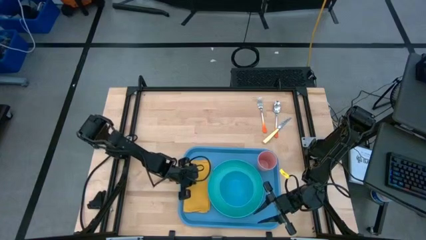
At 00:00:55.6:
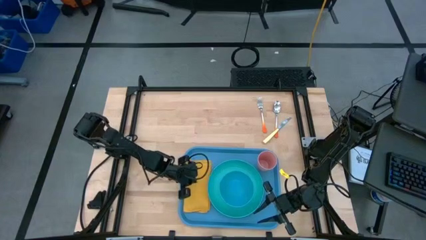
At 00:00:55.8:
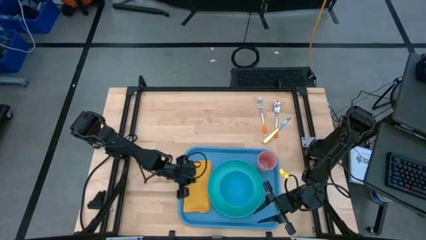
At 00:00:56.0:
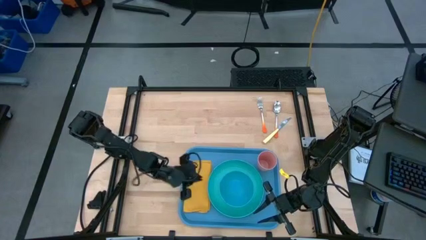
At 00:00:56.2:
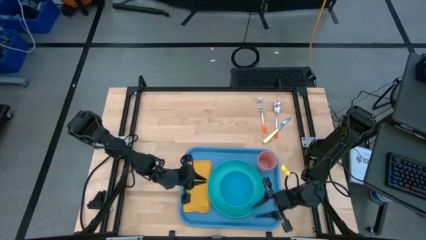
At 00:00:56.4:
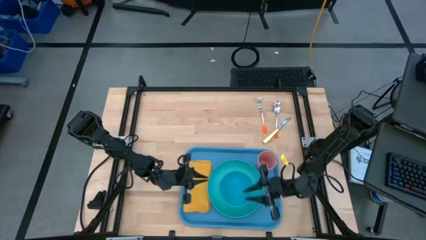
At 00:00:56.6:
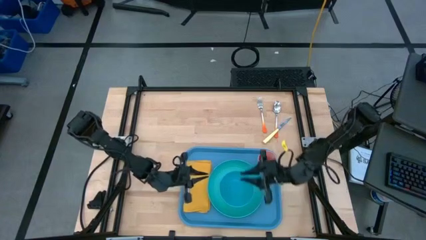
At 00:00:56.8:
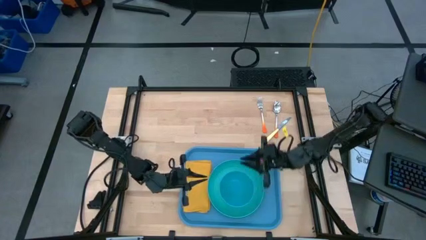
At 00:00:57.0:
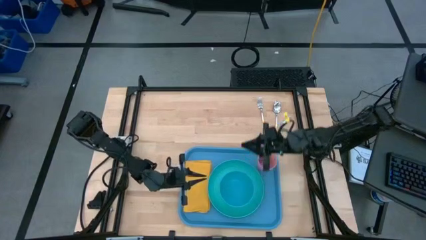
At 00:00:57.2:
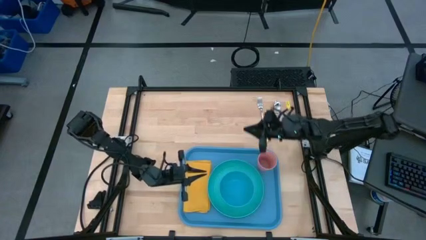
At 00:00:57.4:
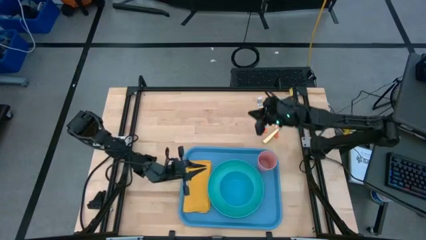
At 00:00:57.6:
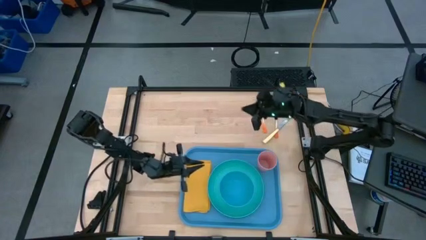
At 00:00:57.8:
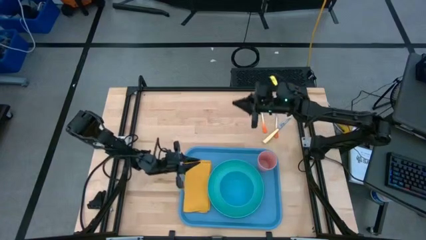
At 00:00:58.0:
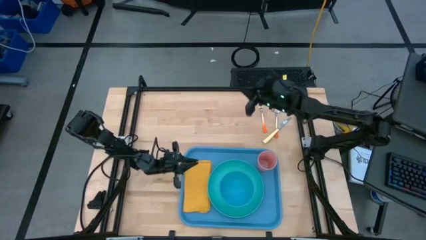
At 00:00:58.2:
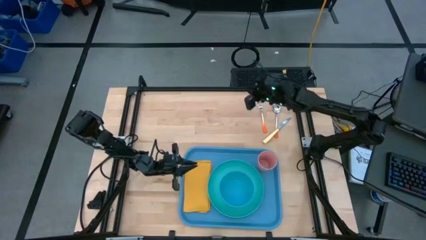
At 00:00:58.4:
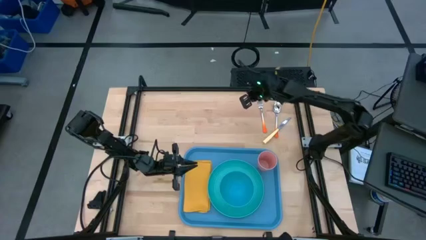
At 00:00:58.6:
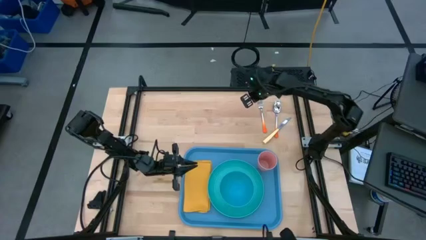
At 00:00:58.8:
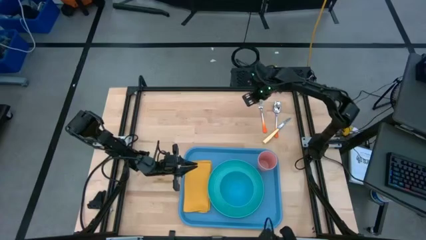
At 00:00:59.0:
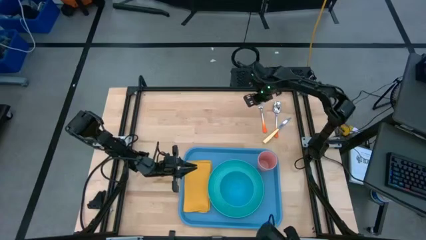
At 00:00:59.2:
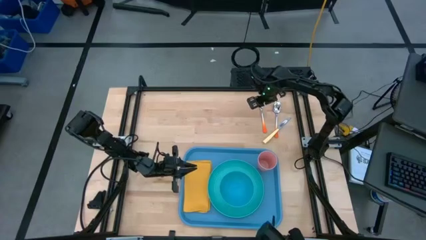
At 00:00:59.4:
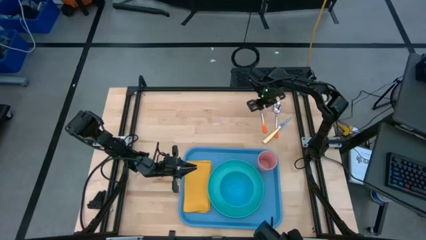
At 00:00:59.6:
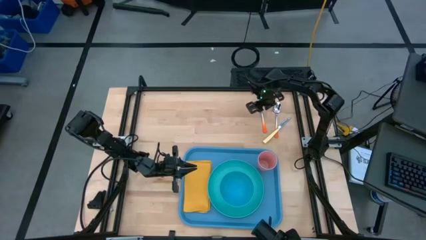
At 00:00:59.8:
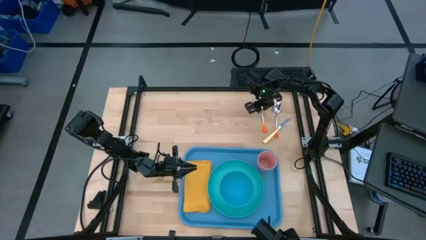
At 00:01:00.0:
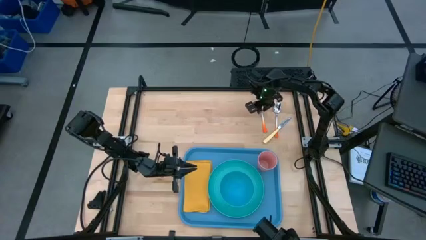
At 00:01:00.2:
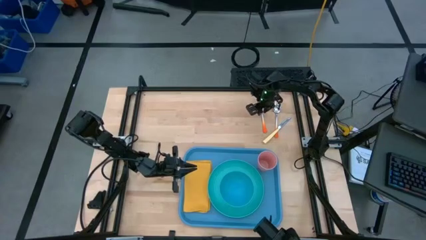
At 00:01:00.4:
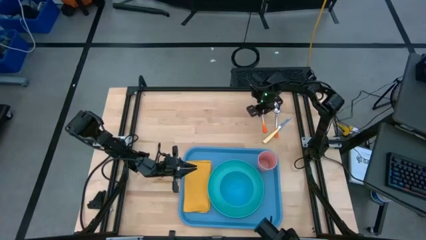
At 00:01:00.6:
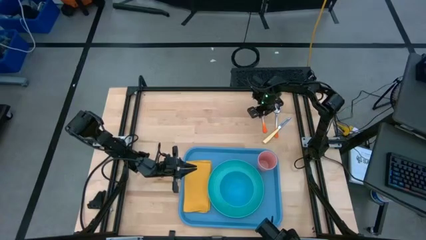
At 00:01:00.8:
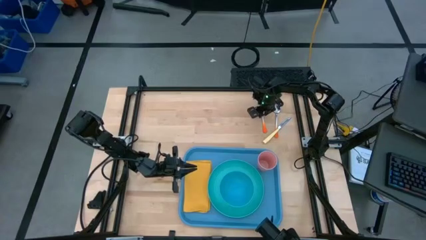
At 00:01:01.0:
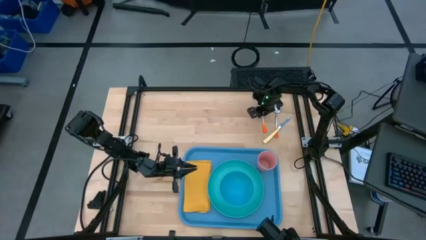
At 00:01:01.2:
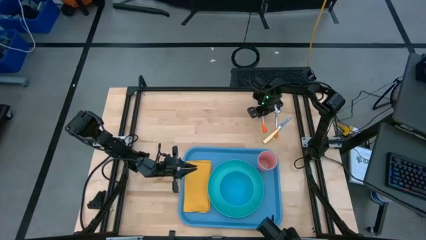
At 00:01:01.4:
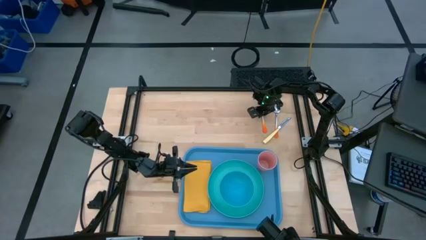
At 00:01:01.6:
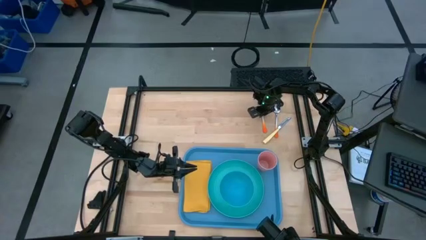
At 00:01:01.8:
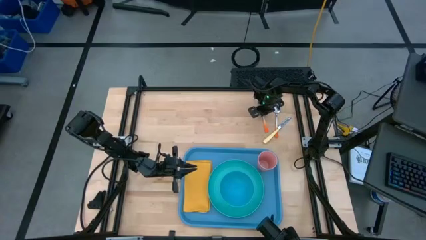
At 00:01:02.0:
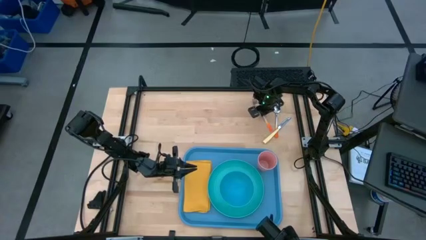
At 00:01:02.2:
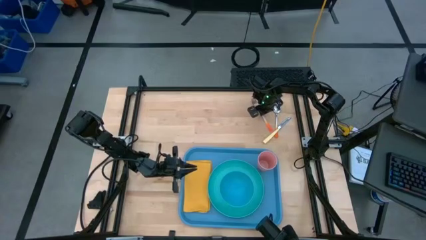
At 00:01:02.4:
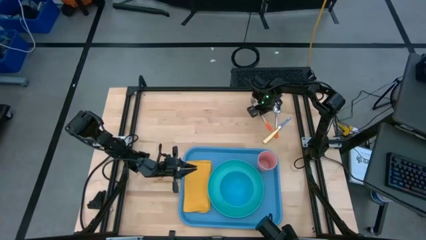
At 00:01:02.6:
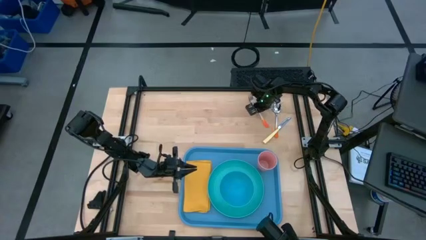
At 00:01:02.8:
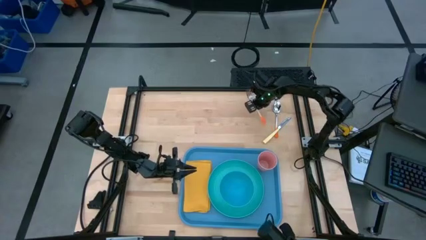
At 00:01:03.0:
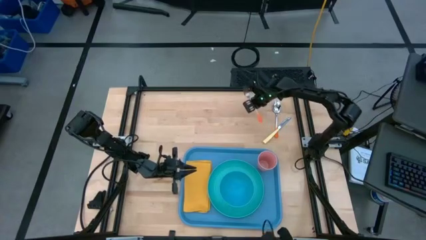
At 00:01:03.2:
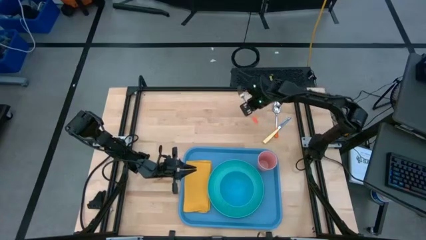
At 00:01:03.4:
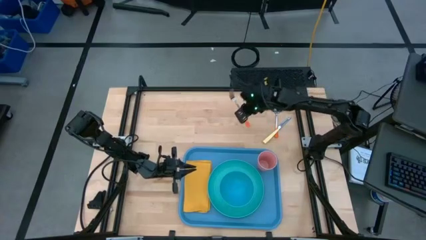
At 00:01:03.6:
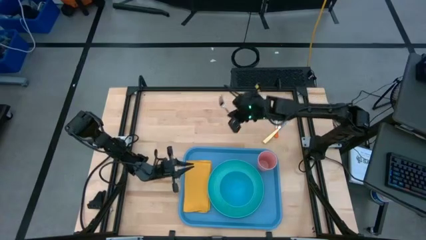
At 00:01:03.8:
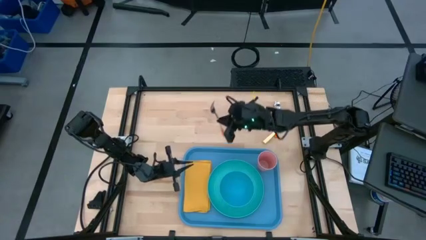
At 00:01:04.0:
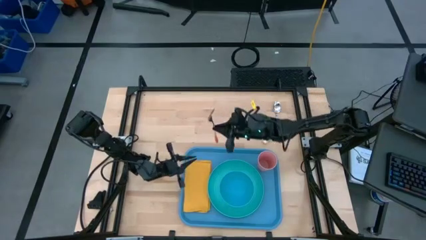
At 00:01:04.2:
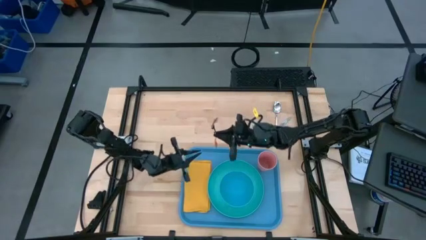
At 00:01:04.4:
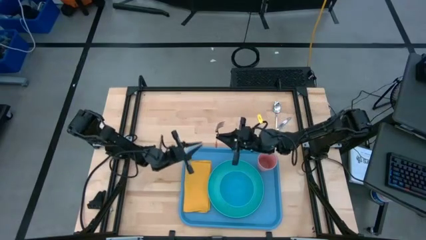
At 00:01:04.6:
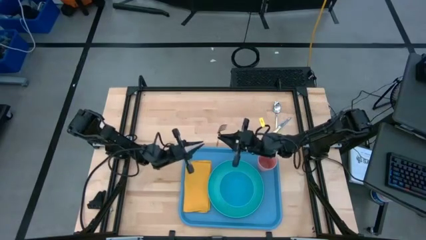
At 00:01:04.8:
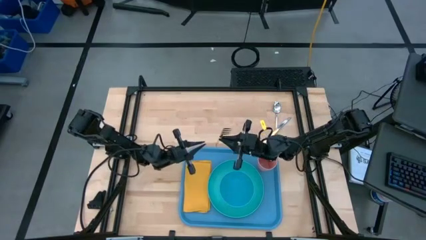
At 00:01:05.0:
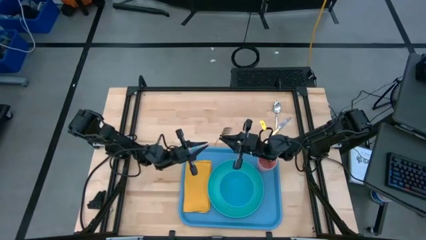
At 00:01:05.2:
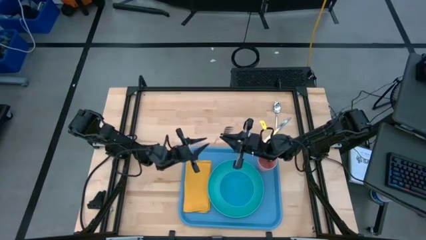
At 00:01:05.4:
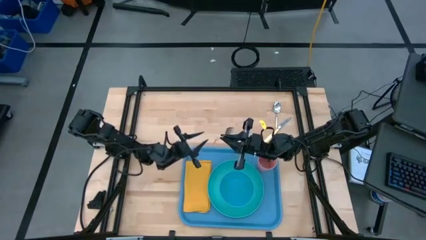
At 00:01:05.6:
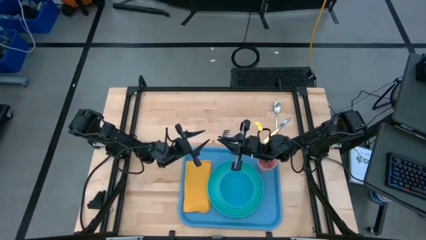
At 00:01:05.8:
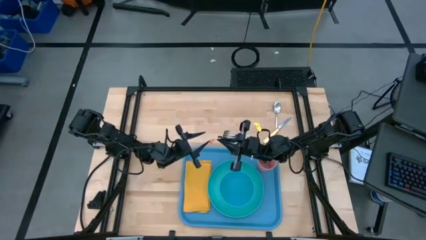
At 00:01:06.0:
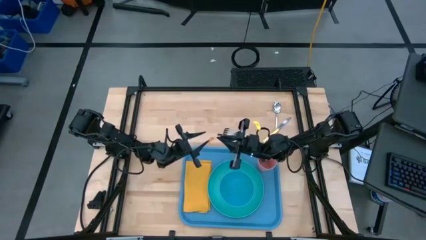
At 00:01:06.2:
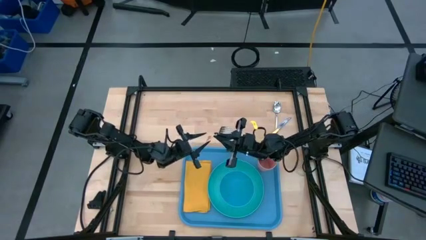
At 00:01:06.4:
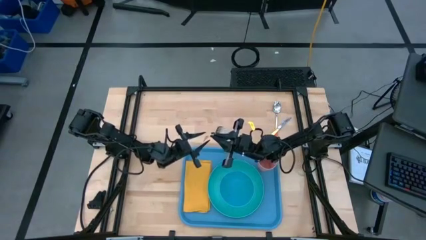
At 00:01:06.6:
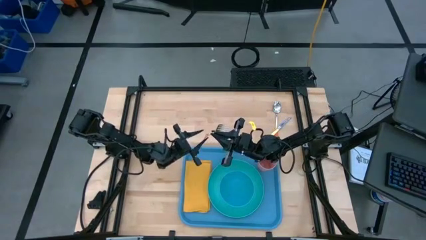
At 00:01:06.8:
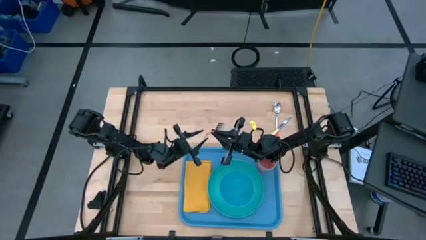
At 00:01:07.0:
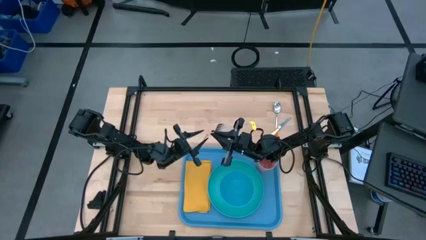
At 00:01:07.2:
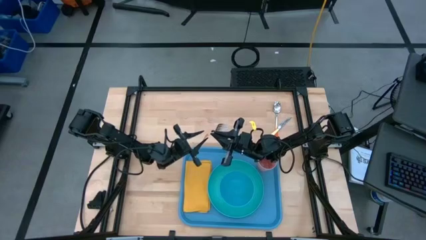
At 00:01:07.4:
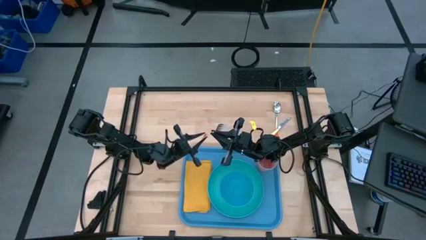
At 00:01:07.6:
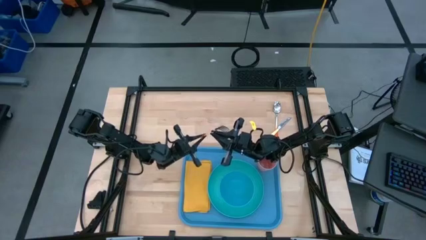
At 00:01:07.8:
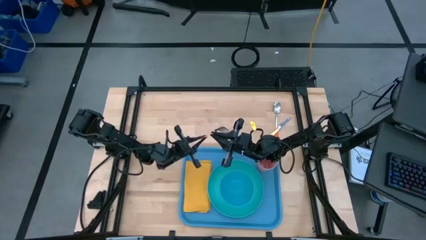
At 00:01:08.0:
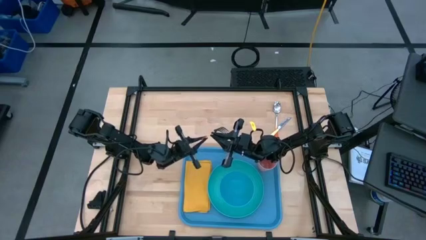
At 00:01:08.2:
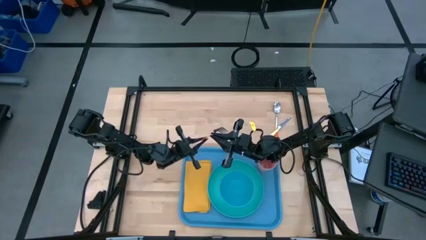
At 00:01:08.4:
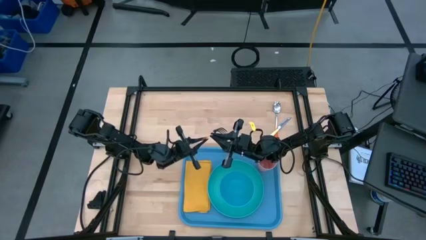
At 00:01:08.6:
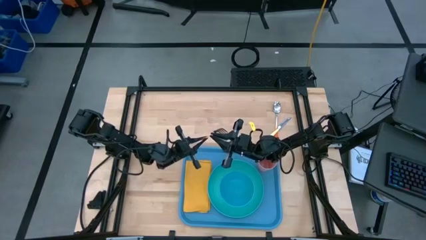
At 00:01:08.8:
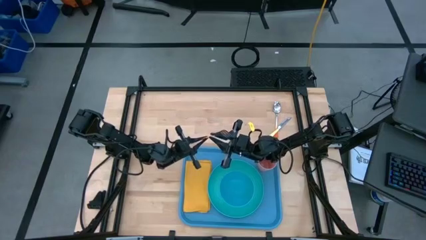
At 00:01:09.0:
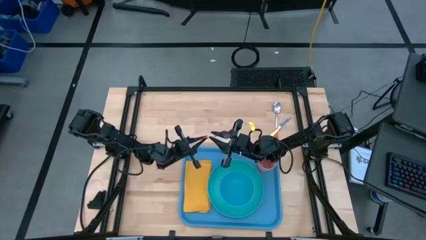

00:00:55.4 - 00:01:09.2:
Task: Set up tray
Put the orange fork on top of the napkin

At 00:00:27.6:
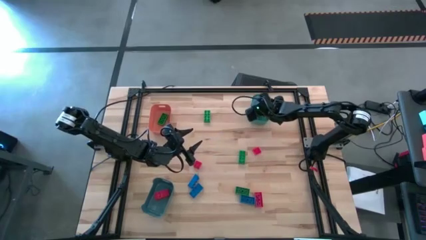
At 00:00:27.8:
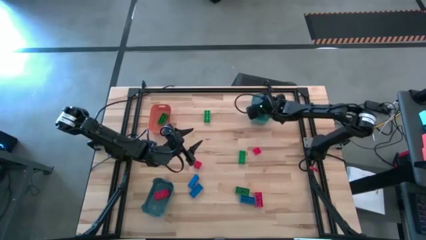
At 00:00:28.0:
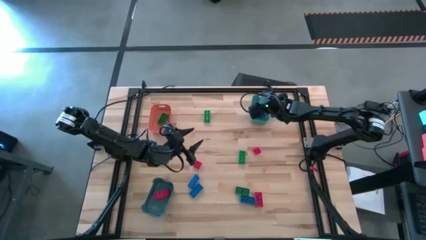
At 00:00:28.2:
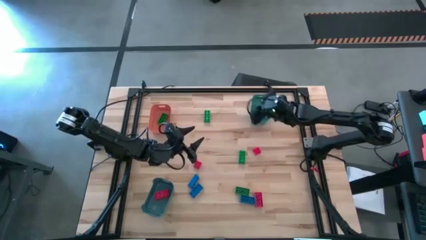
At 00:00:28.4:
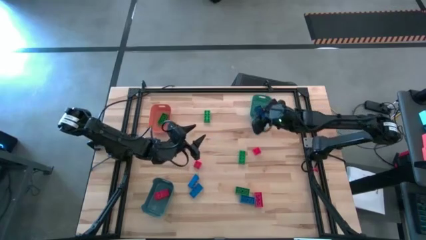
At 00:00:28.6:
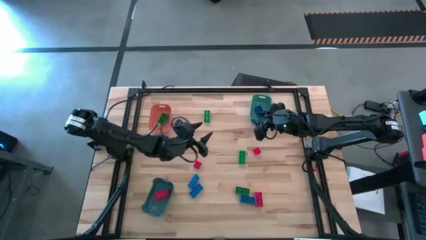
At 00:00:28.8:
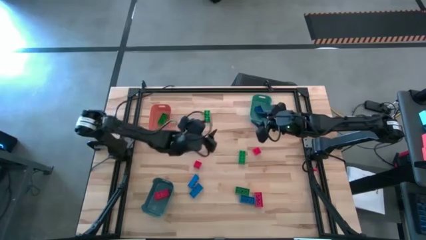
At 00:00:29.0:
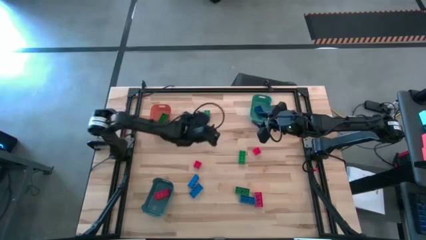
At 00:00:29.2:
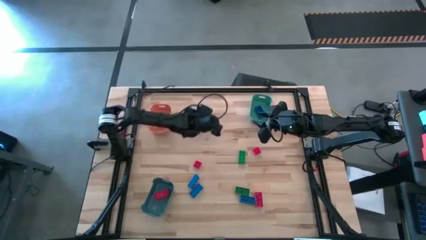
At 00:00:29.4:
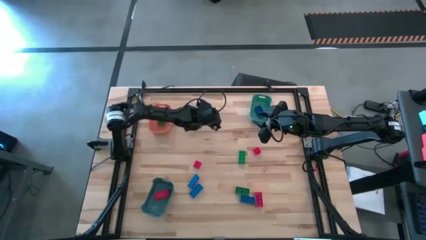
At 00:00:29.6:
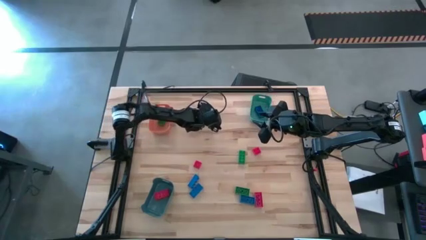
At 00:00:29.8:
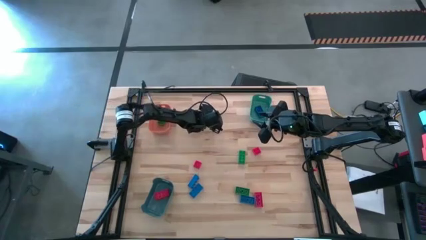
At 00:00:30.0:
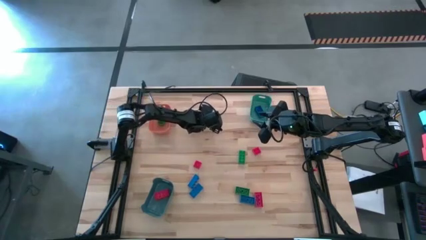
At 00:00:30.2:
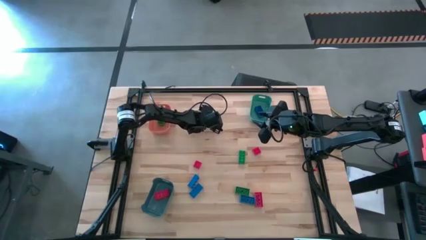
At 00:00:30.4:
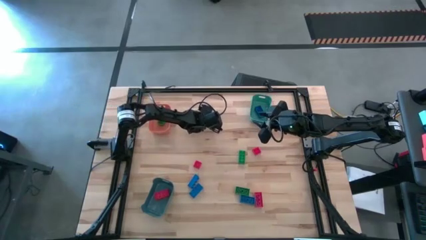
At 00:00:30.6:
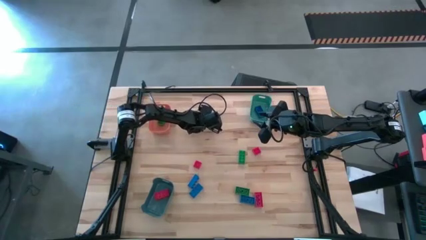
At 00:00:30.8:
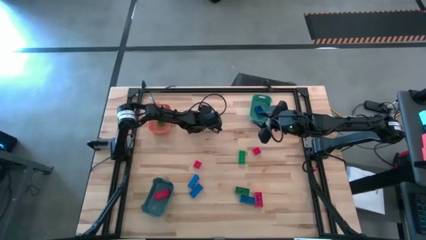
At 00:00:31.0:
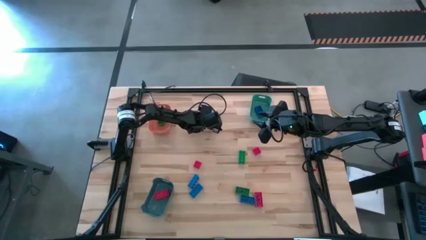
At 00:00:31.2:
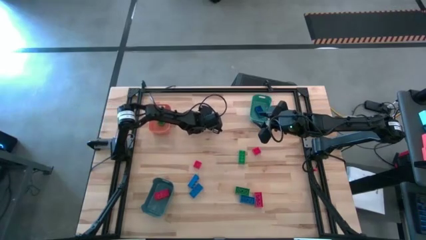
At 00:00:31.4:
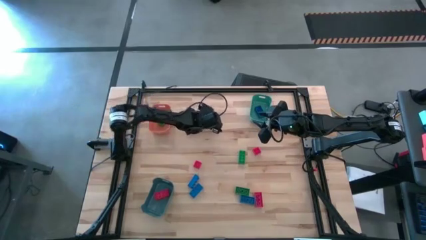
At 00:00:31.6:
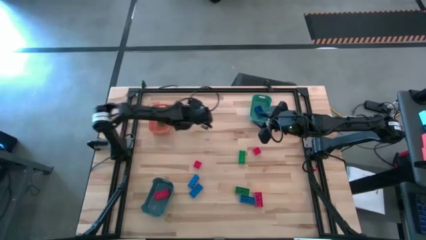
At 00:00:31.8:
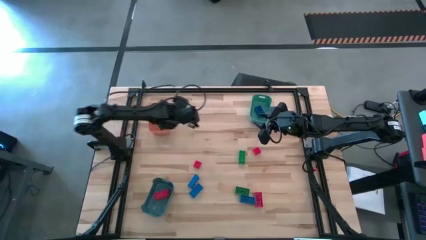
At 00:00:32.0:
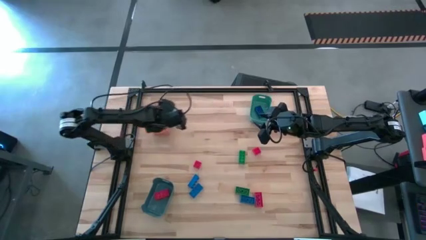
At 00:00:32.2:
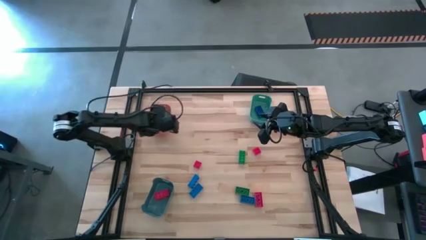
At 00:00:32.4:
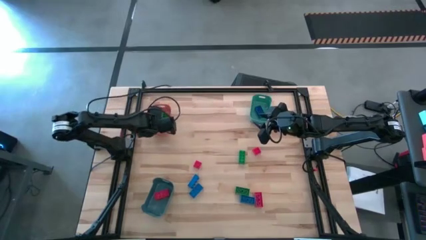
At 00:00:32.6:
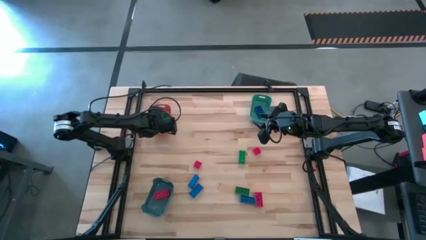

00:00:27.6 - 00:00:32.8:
Task: Sort & place blocks by color
Put the green game piece into the orange bin
